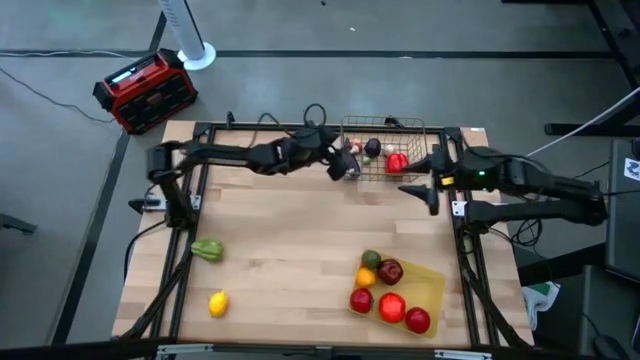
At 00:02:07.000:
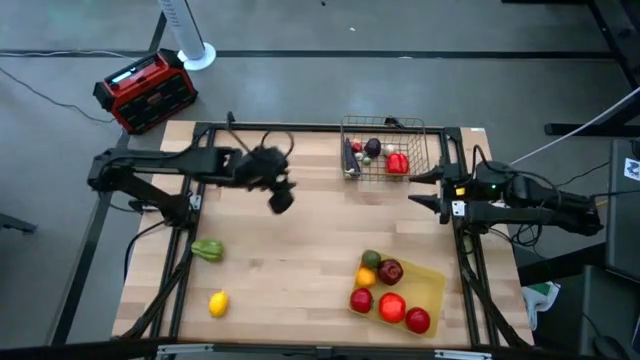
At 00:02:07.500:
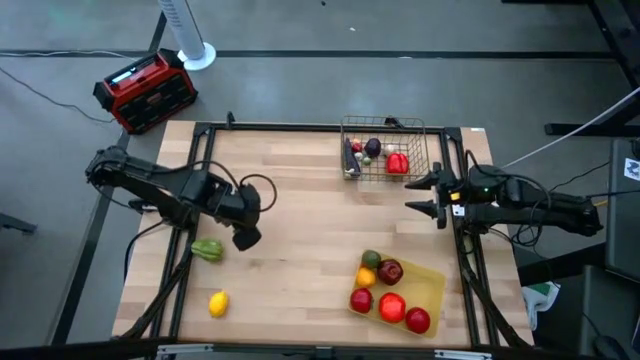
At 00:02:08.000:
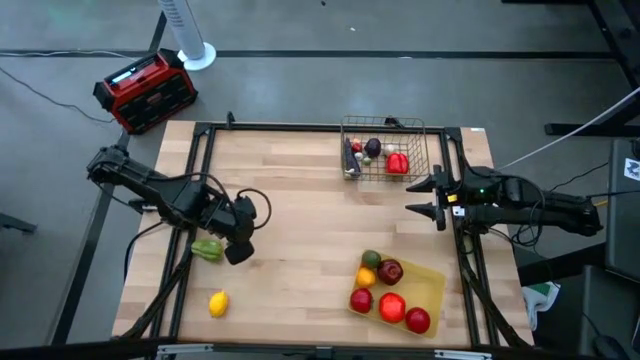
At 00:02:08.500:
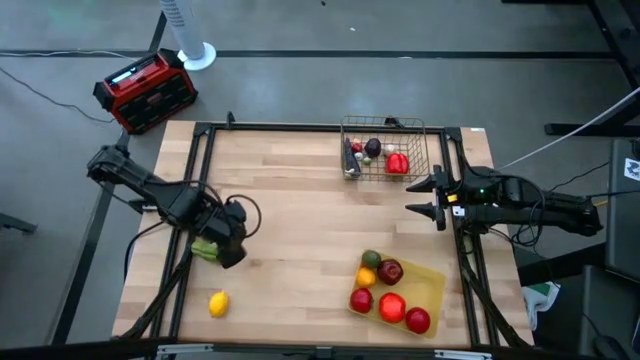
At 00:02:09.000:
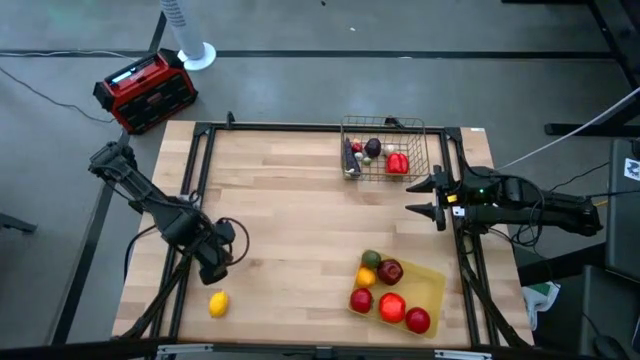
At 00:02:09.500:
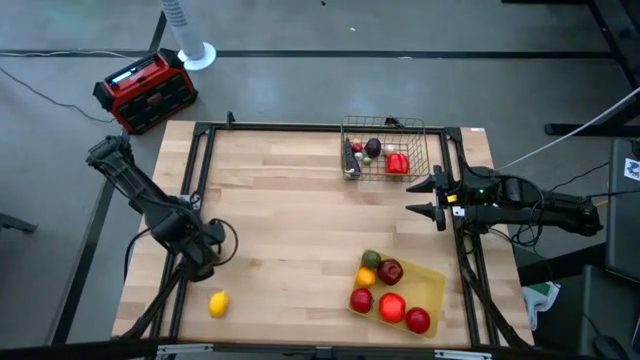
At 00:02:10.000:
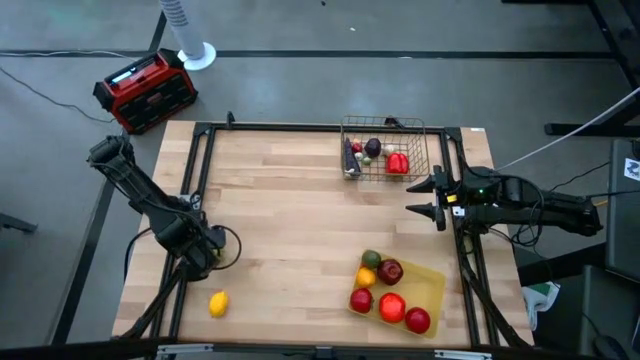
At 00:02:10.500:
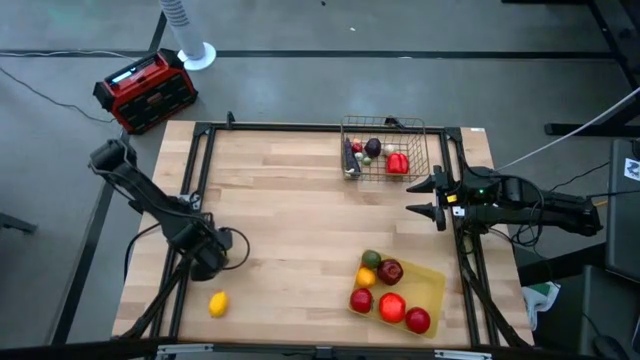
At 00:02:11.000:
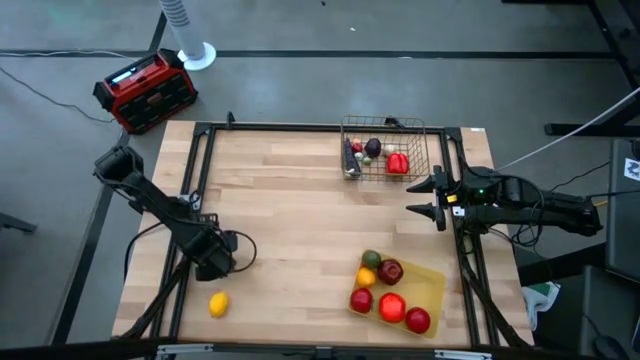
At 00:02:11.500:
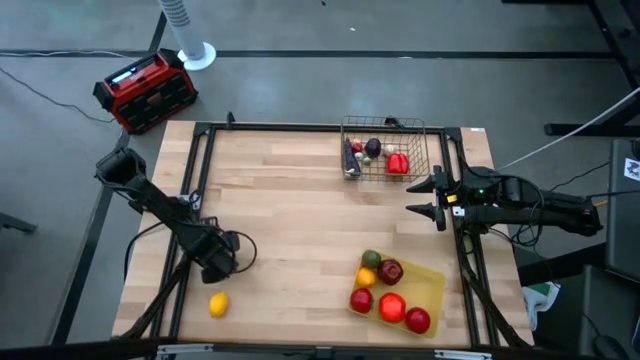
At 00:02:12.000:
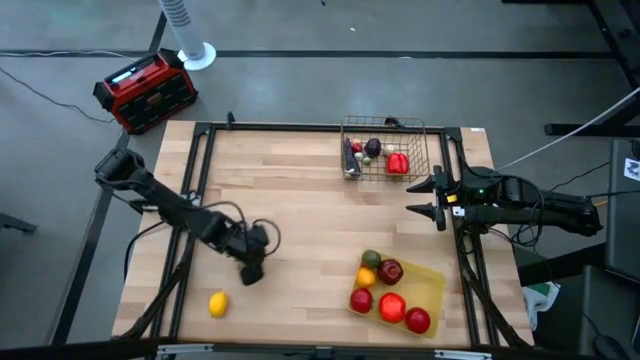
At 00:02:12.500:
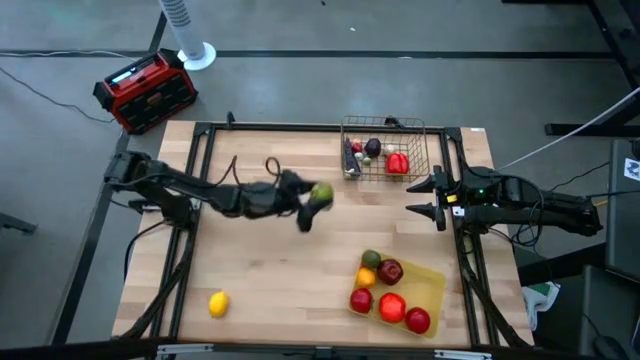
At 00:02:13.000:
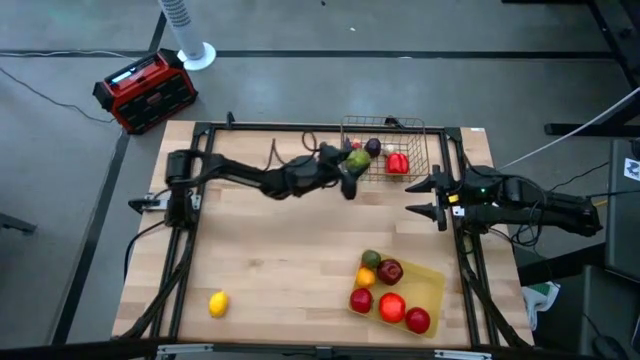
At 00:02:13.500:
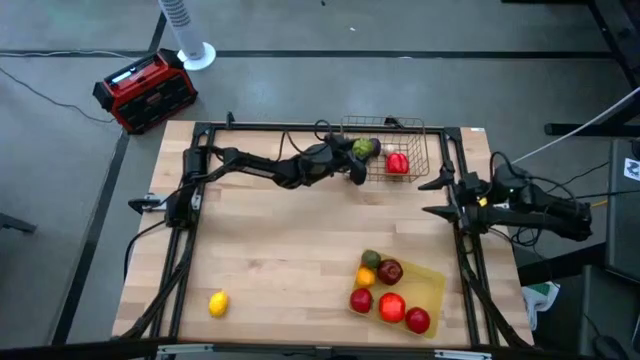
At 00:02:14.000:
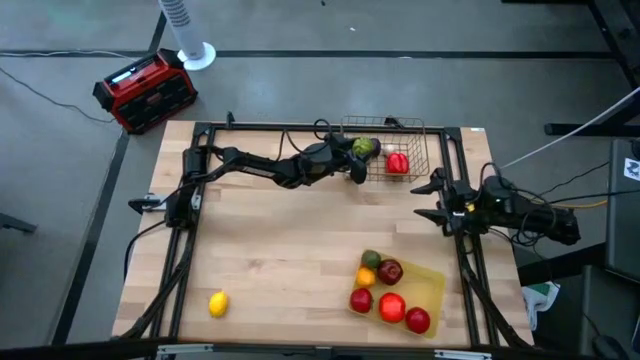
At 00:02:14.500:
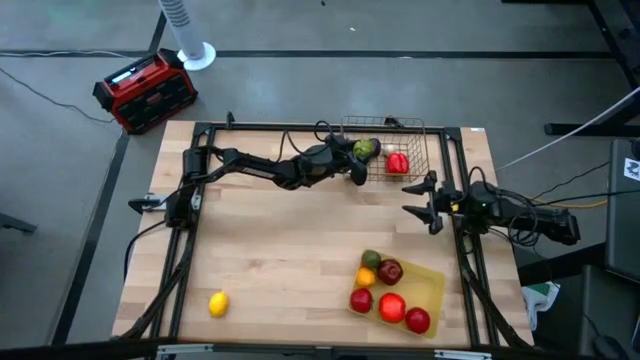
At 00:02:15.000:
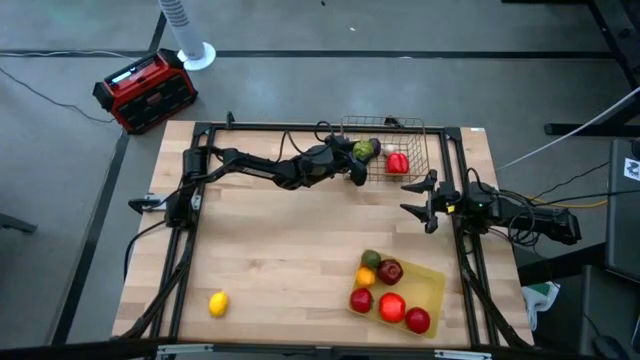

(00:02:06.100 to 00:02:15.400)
Task: Sort produce into baskets
Put the chayote into the basket

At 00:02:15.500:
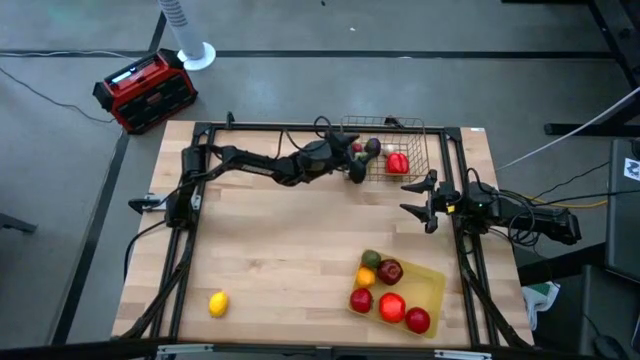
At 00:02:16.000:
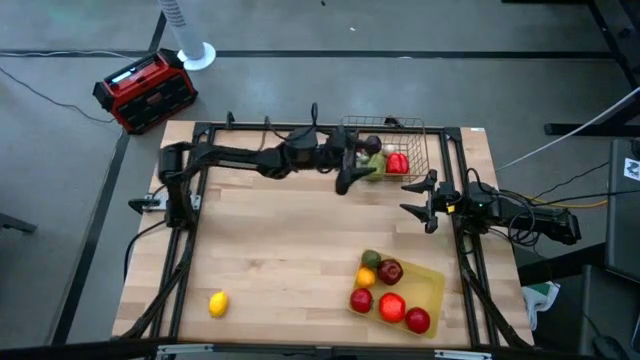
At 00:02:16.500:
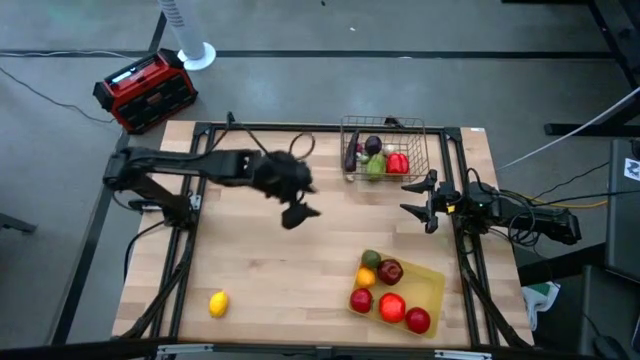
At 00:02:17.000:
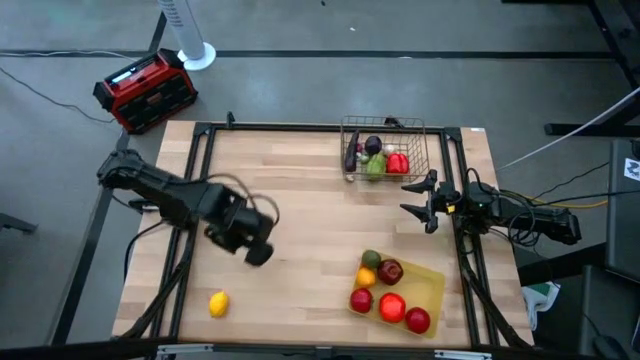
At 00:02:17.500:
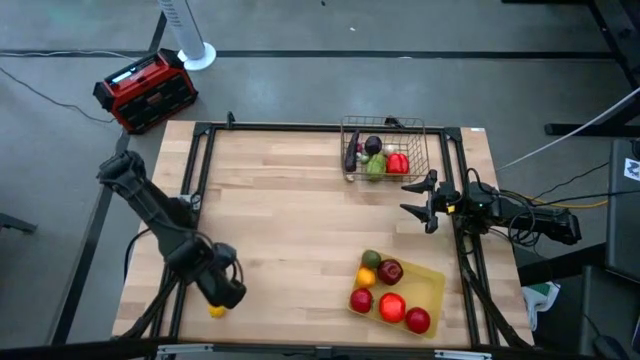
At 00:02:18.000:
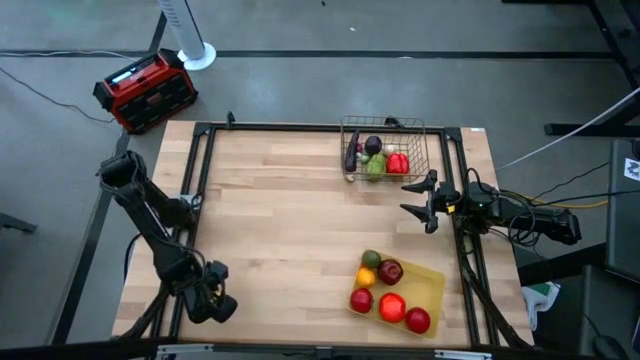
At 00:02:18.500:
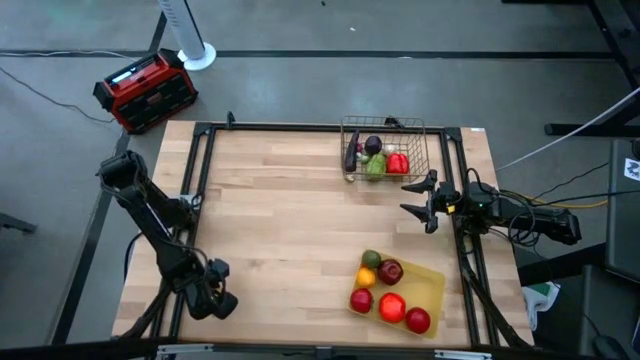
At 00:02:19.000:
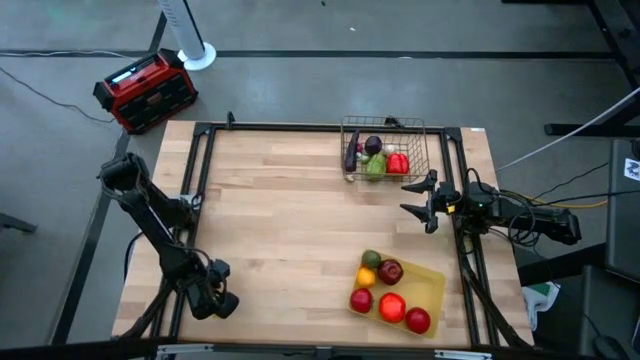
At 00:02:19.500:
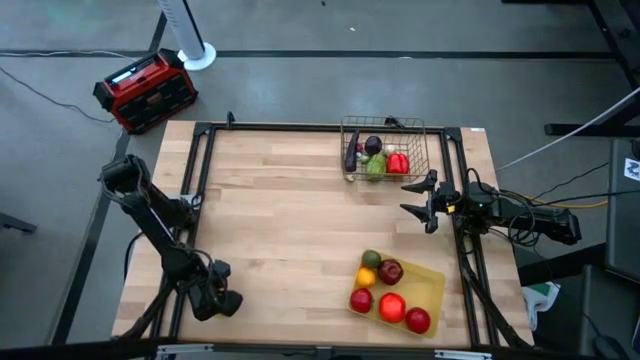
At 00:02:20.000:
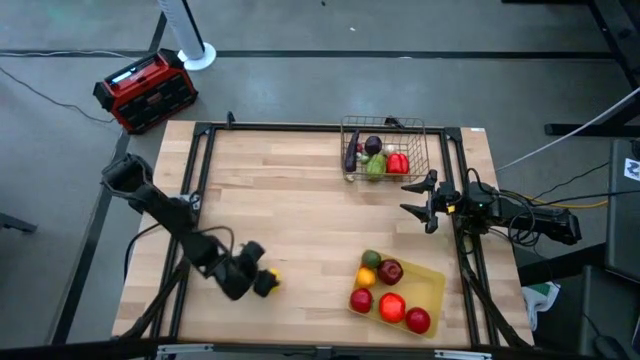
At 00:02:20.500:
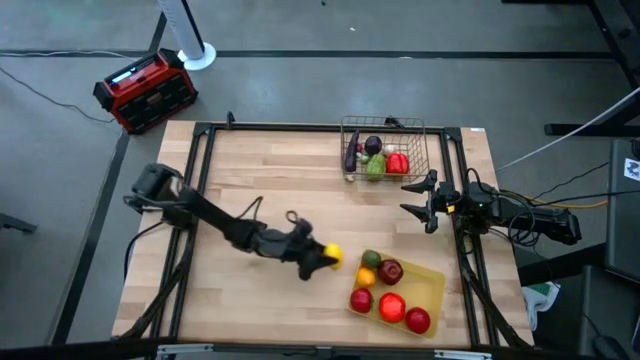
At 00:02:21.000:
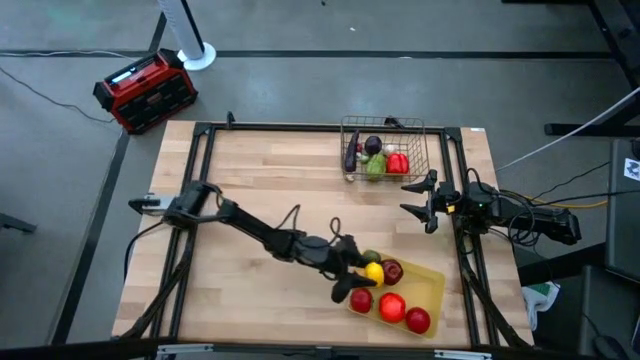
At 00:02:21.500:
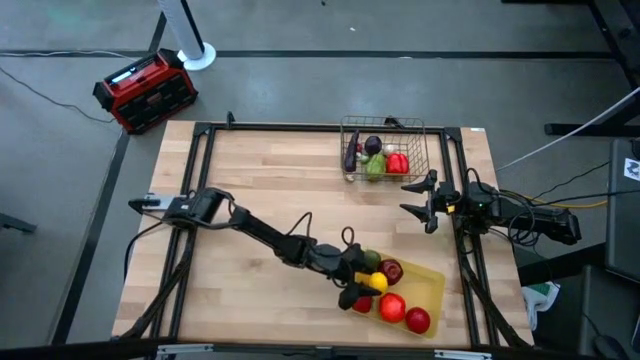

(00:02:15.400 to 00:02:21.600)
Put the lemon into the yellow bin

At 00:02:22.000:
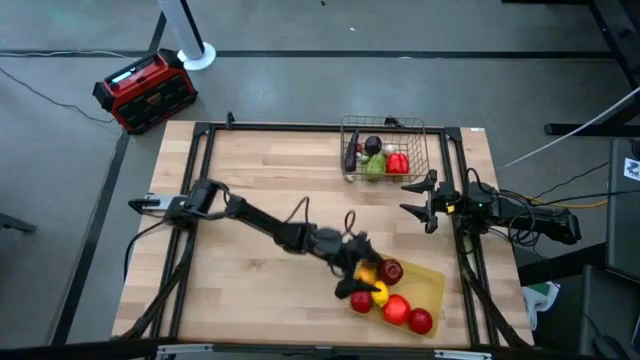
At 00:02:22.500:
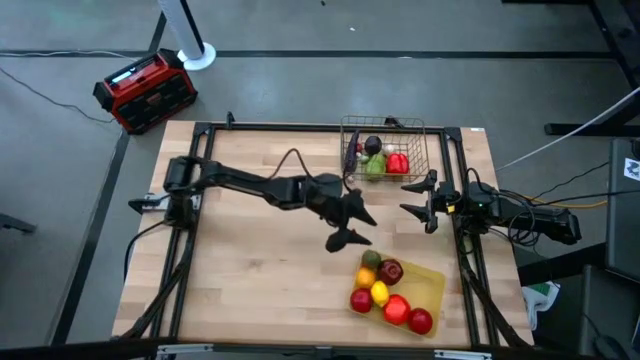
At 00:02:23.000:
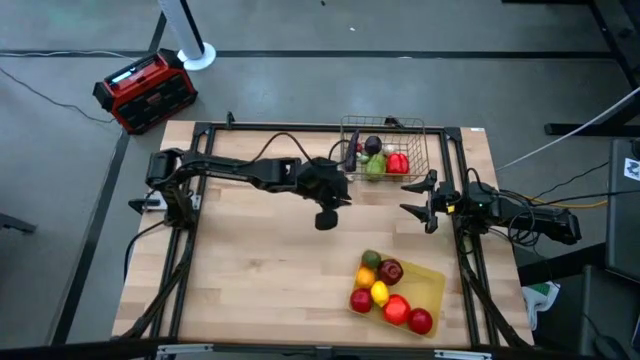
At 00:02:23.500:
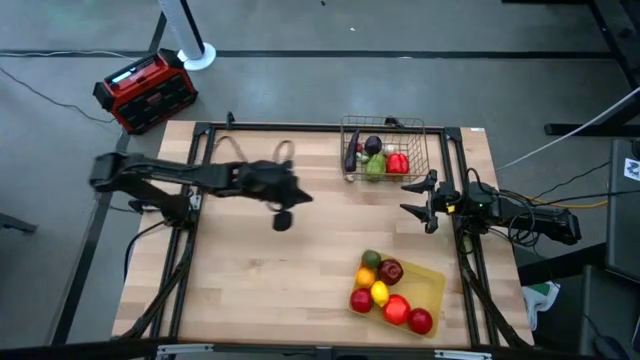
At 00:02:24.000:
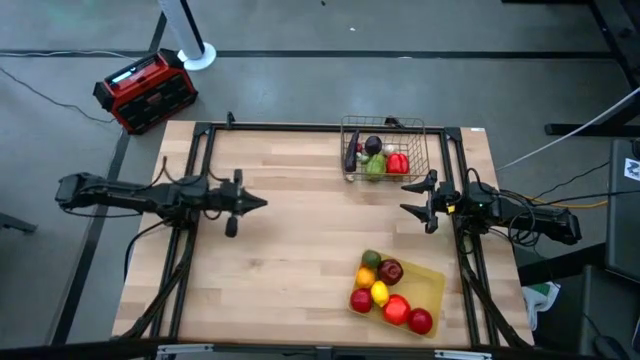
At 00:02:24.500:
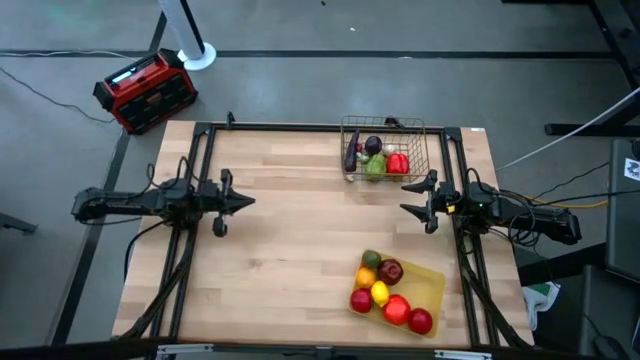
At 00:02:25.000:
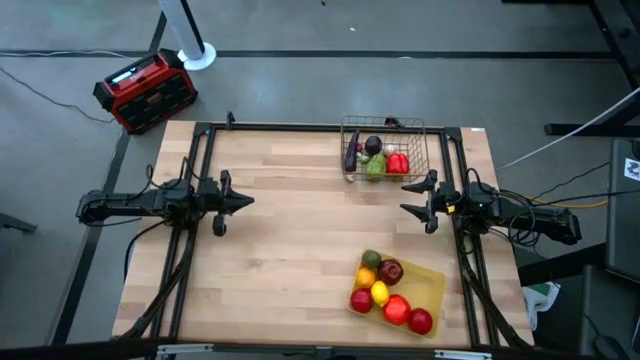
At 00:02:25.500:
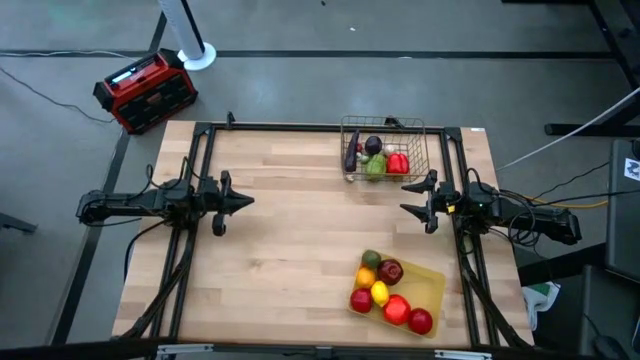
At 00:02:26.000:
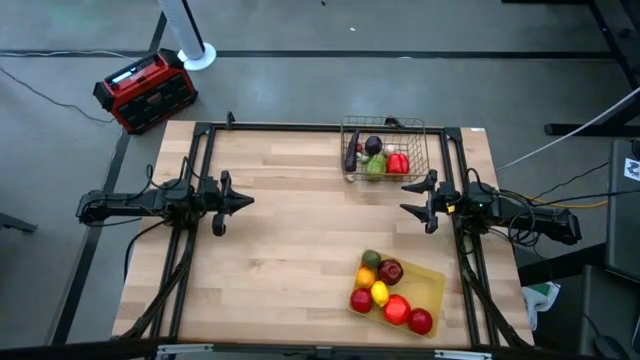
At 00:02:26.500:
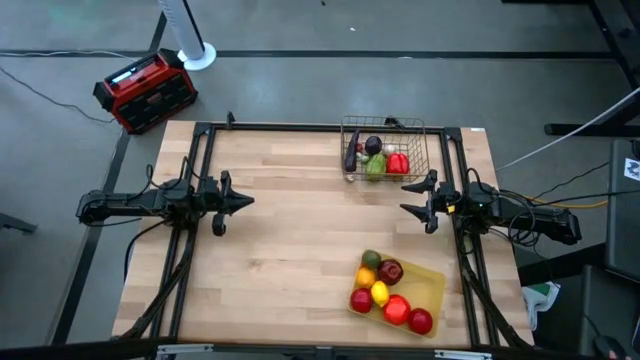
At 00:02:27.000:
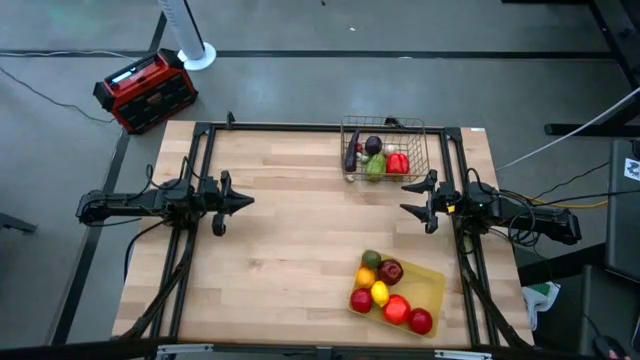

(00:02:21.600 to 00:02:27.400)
Return to Home Position
